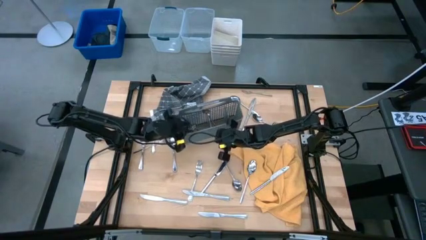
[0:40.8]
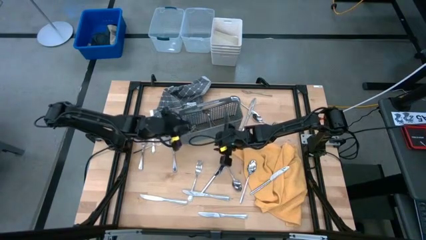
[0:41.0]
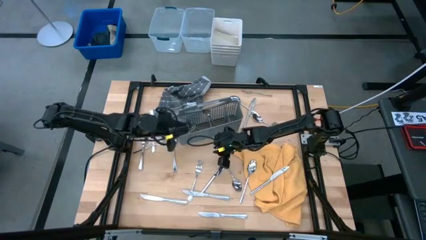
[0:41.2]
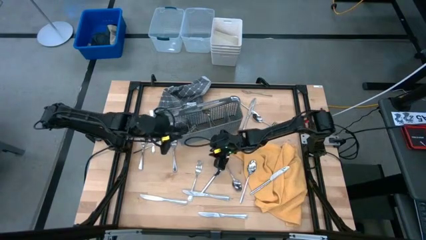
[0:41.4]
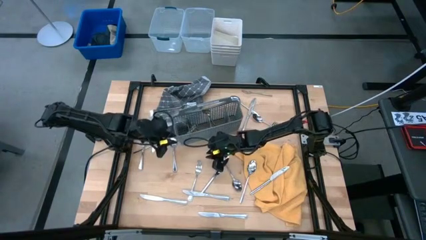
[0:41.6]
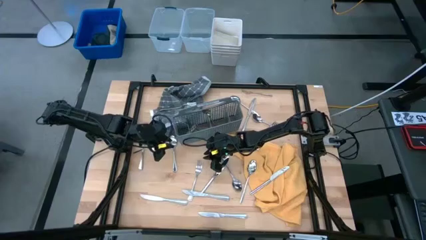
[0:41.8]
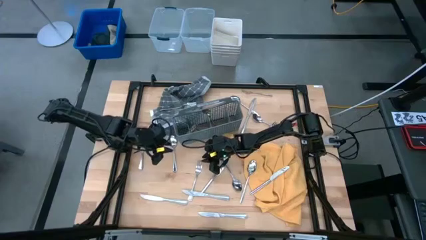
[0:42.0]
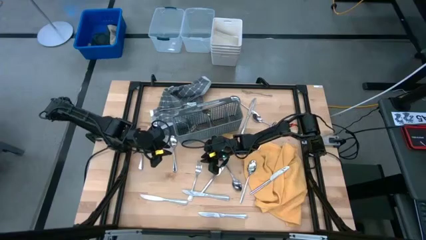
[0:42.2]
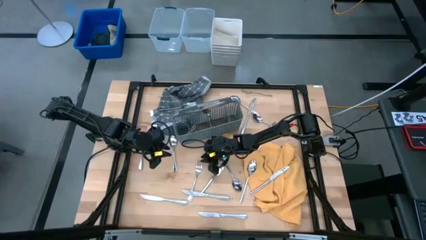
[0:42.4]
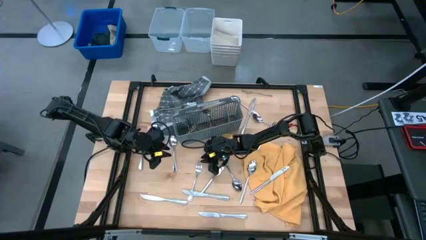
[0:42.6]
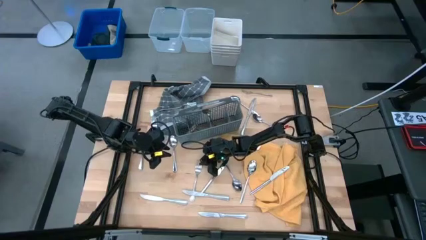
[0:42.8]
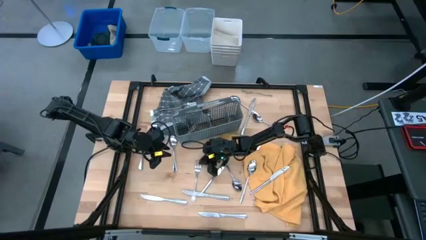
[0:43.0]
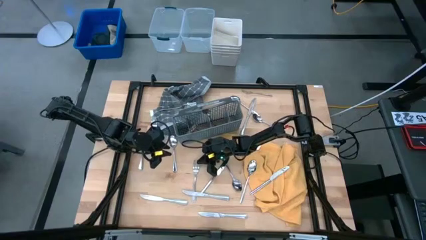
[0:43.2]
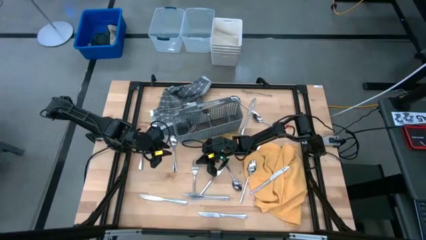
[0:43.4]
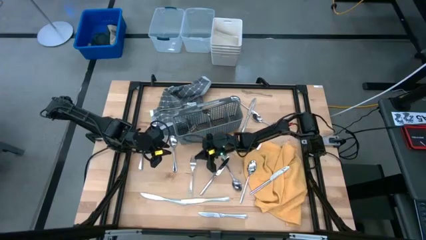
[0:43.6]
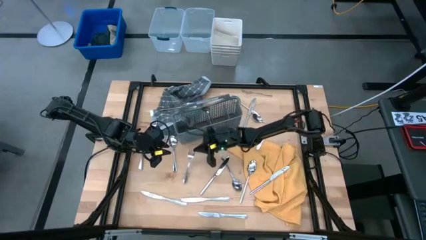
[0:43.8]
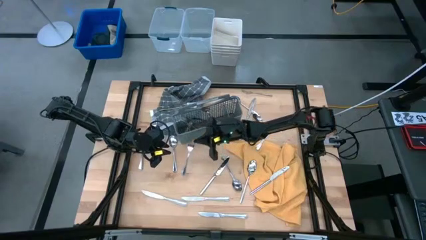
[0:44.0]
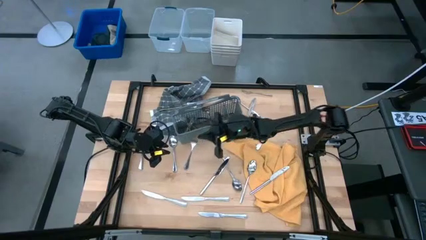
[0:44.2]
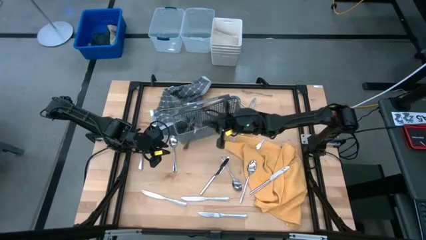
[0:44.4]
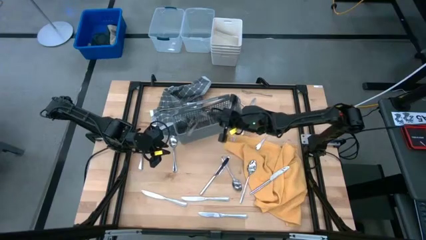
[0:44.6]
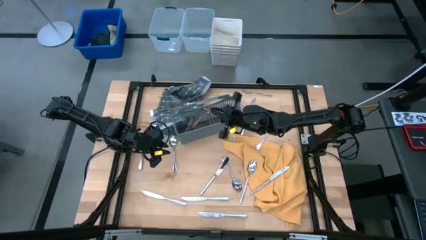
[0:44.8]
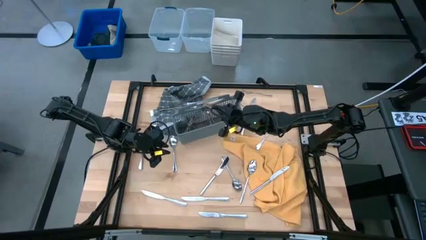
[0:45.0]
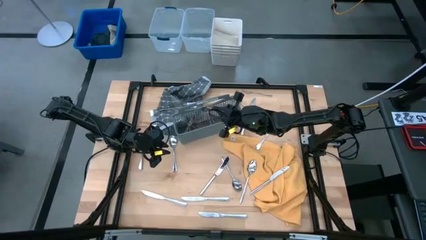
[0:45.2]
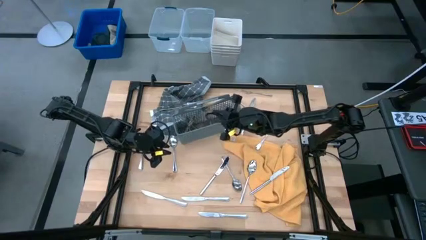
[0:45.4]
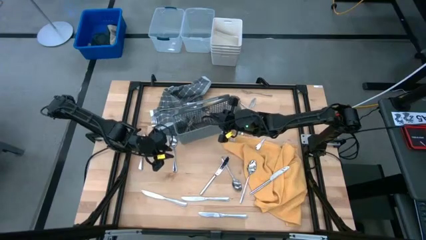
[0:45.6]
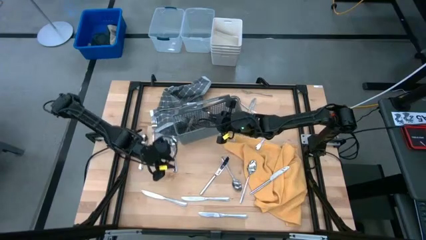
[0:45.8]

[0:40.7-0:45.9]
Task: Sort silverware
Put the silver fork into the gray silverware basket

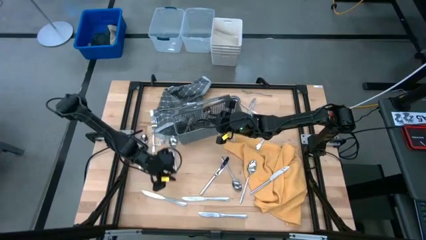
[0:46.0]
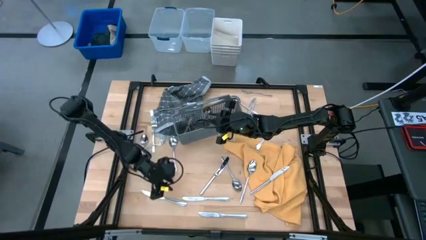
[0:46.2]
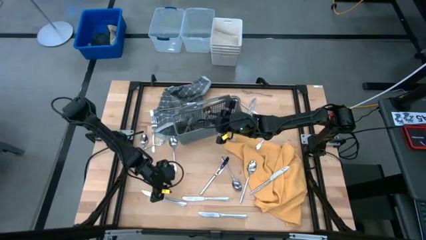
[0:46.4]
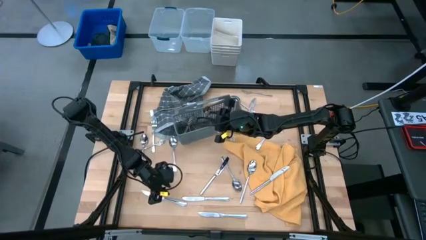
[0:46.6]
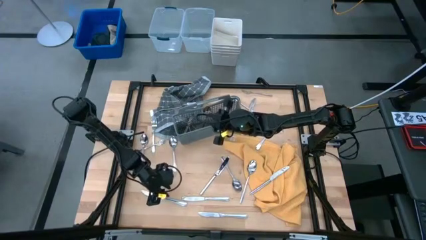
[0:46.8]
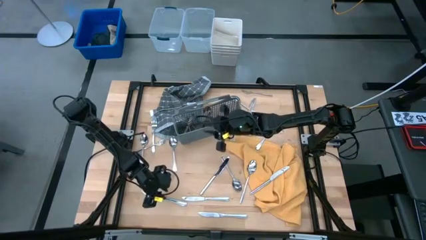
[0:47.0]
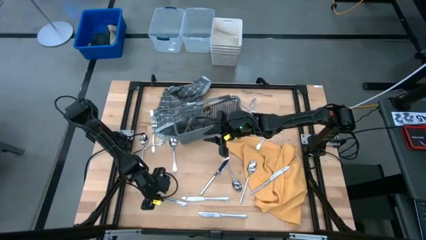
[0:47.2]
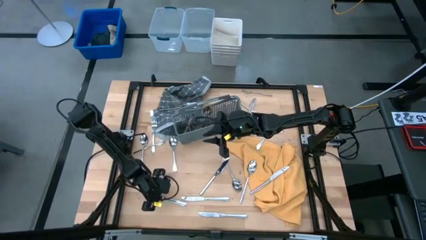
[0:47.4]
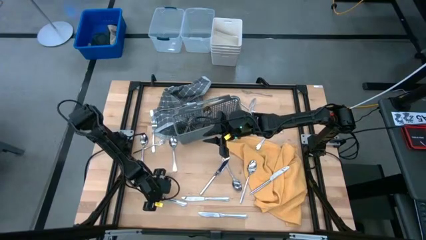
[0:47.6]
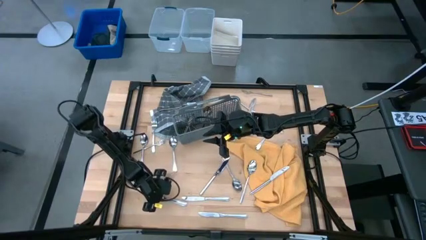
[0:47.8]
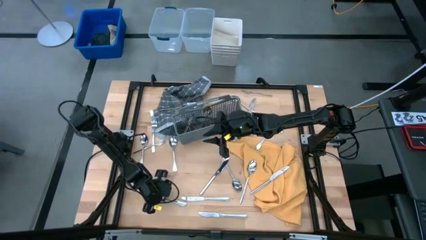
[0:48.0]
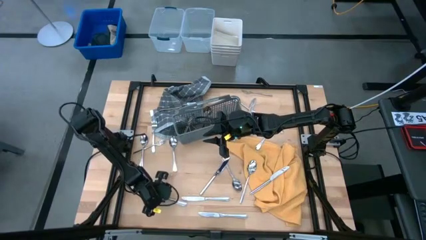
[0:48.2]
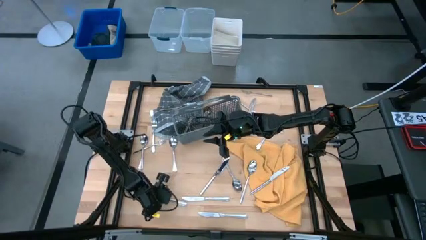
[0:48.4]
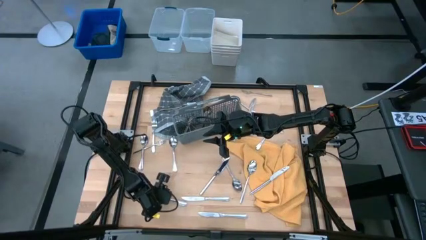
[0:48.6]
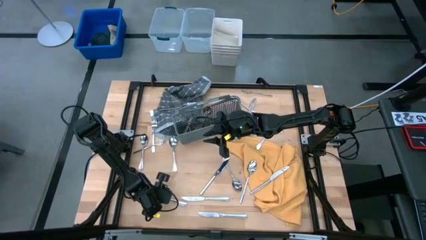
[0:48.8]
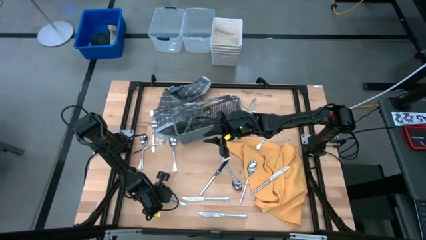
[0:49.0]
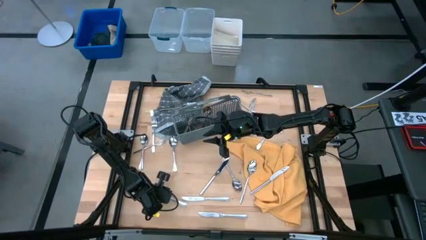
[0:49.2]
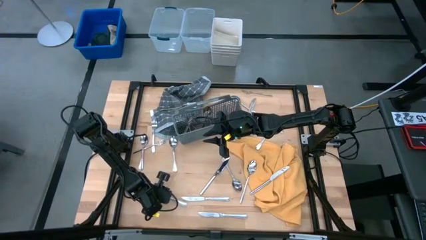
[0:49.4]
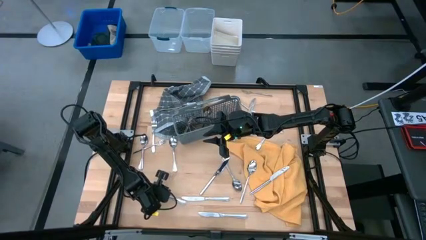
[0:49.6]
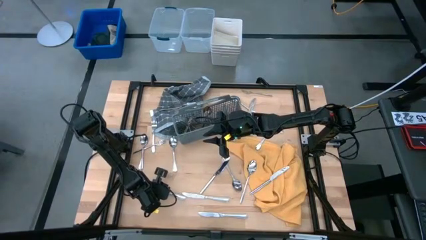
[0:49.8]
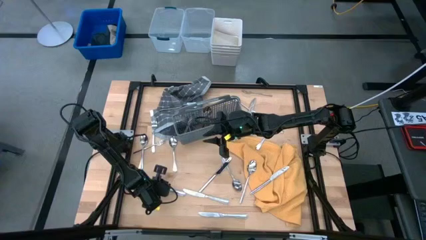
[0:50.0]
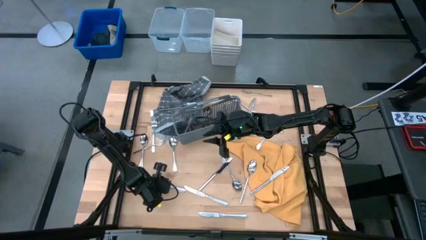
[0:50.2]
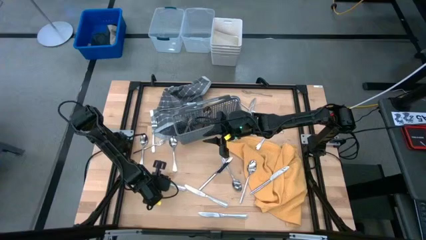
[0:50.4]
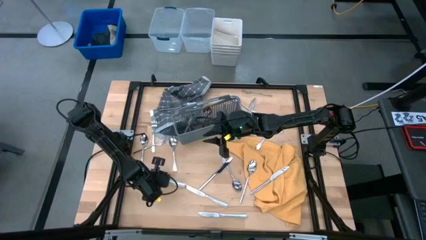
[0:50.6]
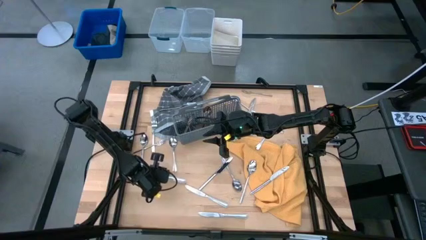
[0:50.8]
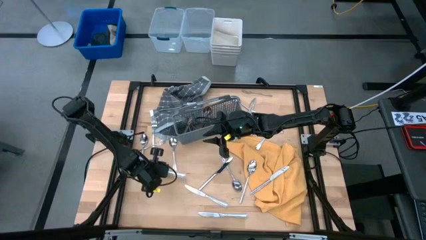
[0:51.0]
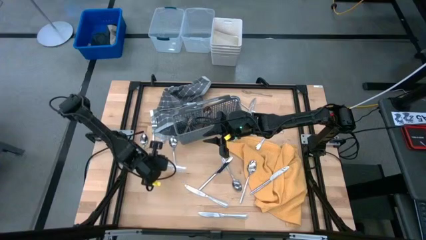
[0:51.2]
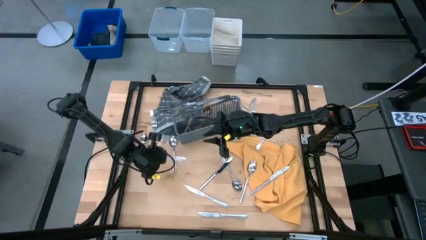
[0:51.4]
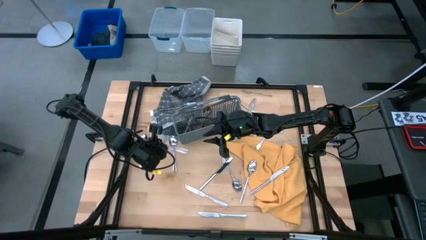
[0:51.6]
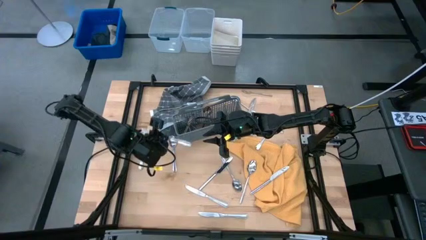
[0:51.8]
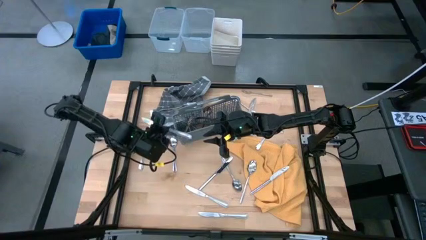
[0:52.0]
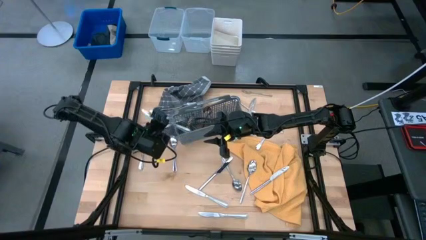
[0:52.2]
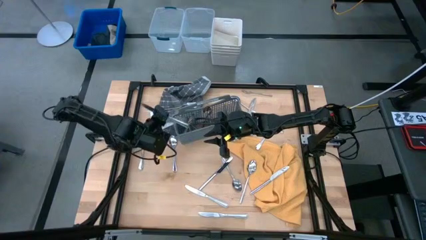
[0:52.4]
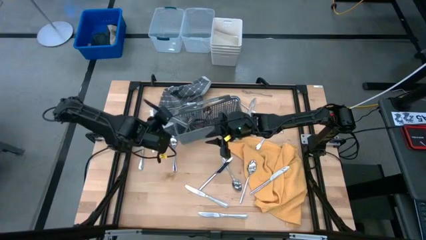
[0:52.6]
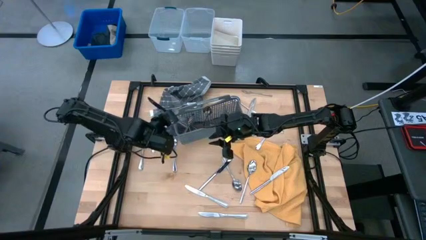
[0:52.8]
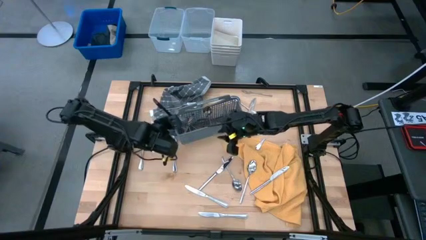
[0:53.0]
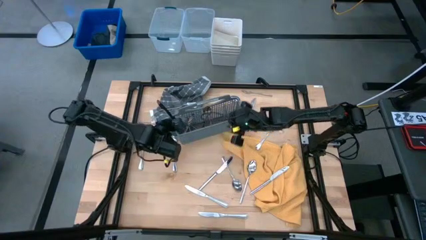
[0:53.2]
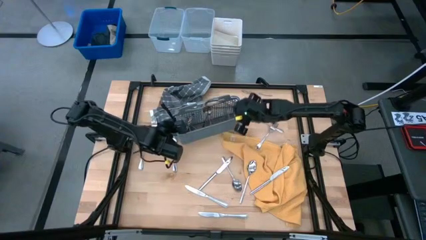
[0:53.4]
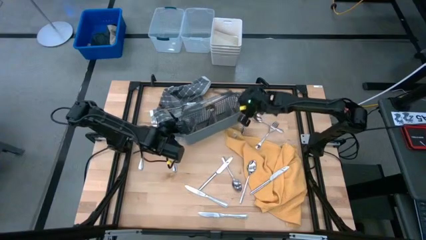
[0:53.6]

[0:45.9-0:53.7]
Put the silver knife into the gray silverware basket
